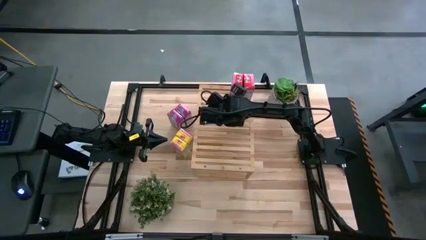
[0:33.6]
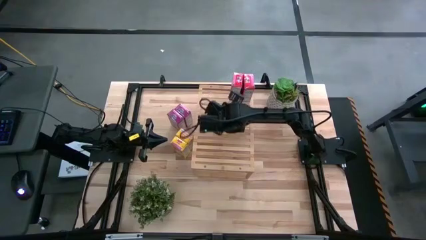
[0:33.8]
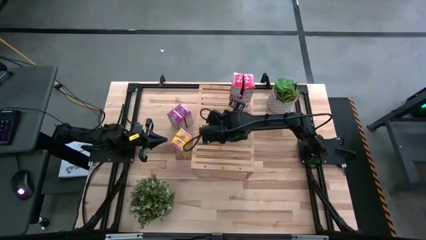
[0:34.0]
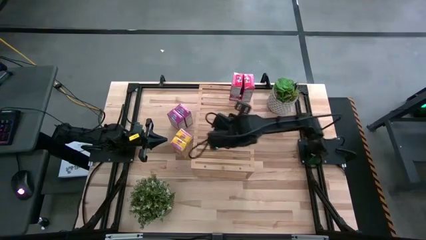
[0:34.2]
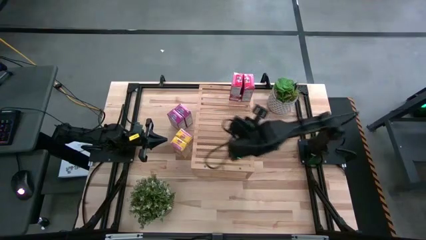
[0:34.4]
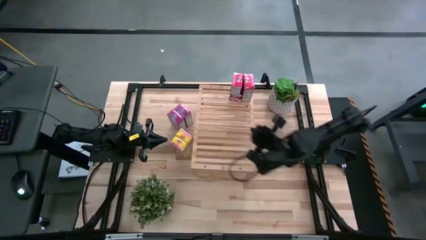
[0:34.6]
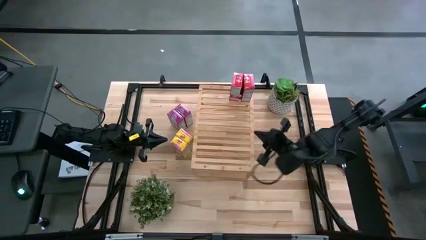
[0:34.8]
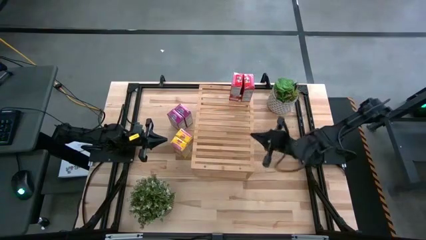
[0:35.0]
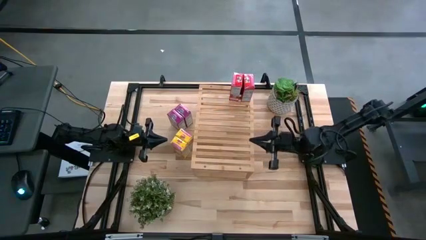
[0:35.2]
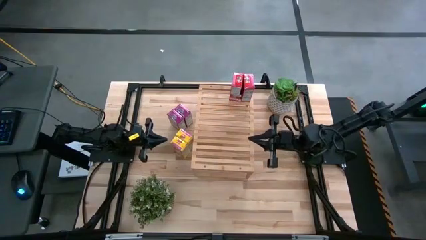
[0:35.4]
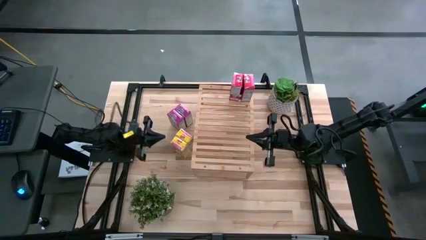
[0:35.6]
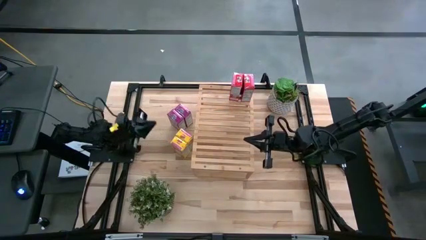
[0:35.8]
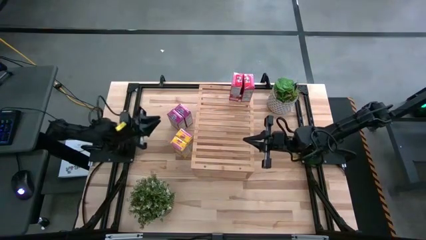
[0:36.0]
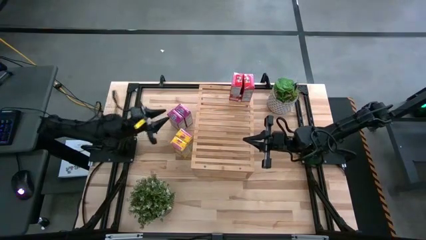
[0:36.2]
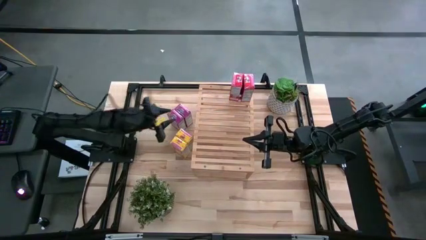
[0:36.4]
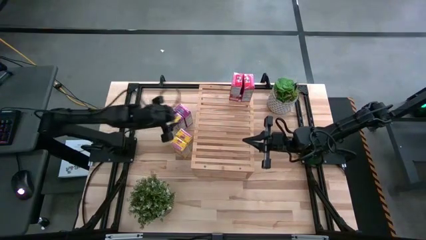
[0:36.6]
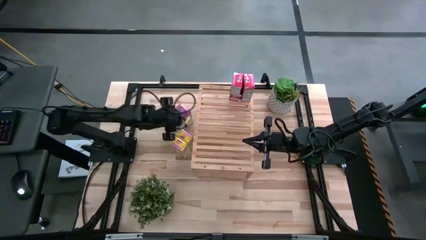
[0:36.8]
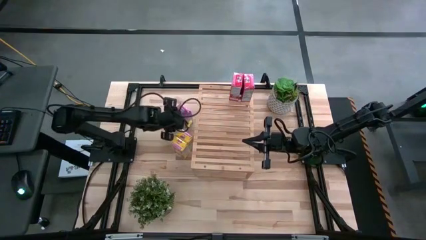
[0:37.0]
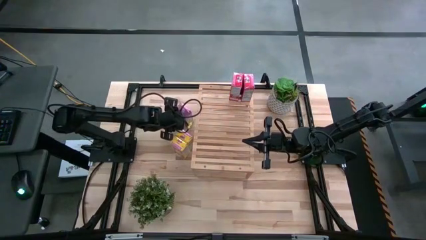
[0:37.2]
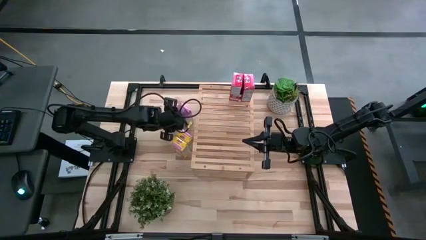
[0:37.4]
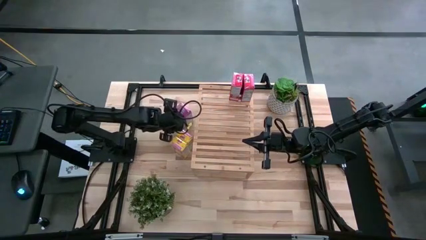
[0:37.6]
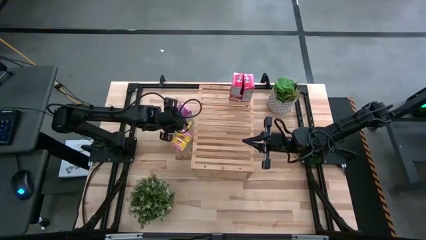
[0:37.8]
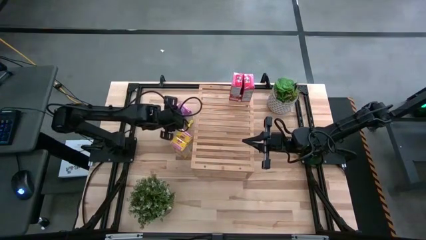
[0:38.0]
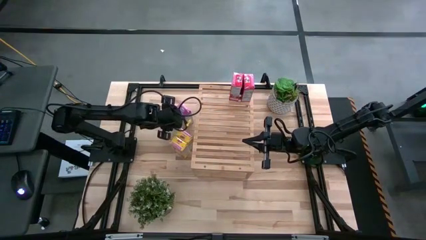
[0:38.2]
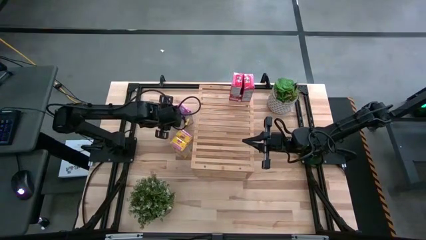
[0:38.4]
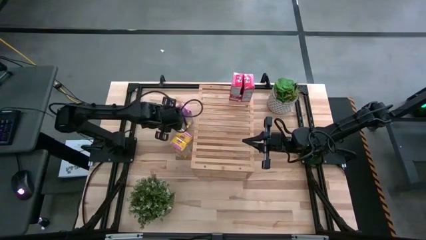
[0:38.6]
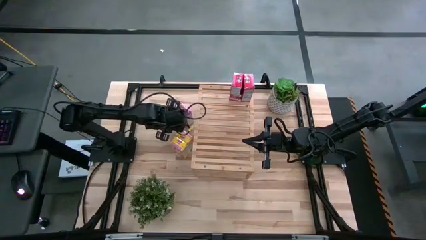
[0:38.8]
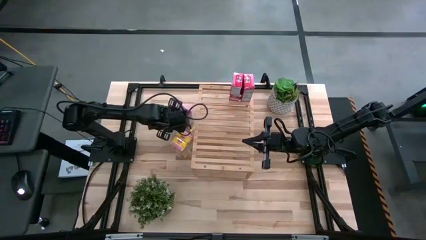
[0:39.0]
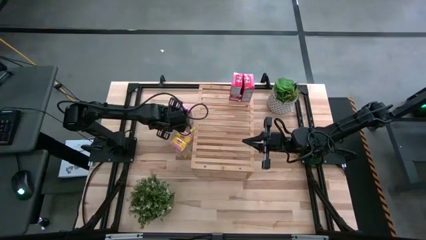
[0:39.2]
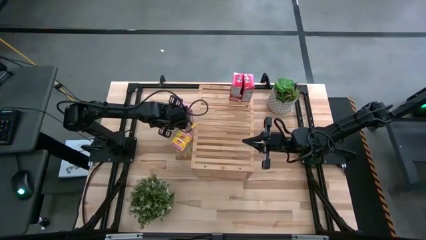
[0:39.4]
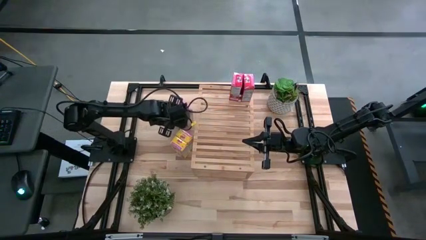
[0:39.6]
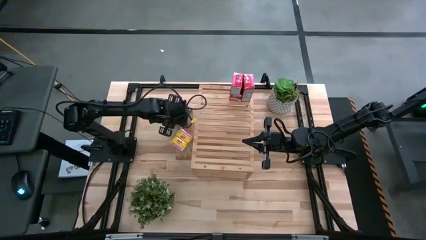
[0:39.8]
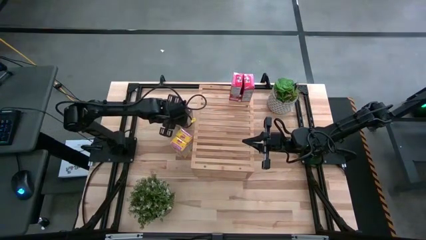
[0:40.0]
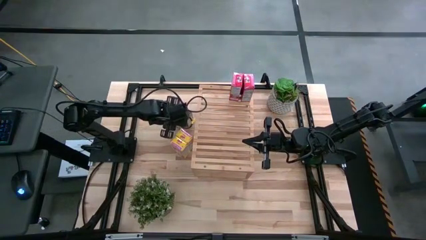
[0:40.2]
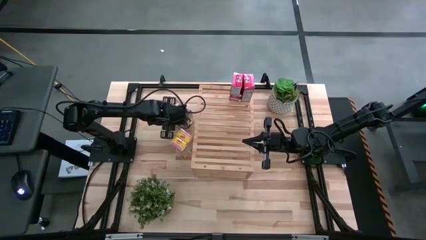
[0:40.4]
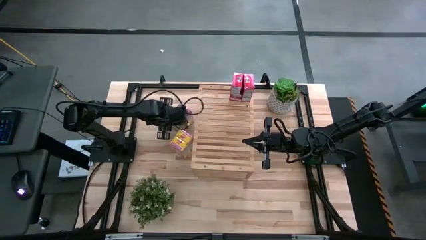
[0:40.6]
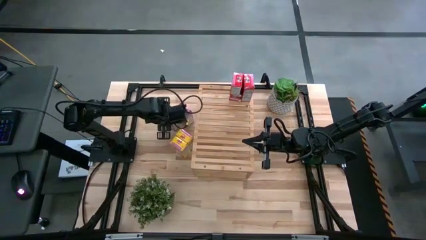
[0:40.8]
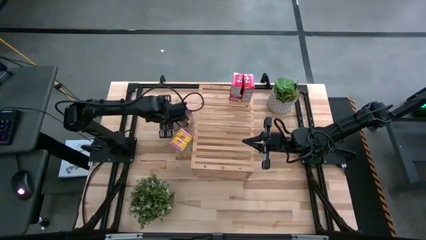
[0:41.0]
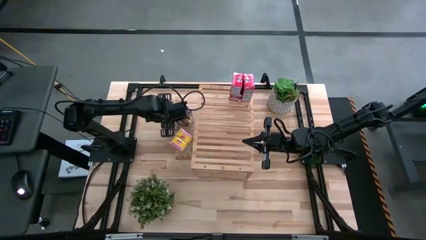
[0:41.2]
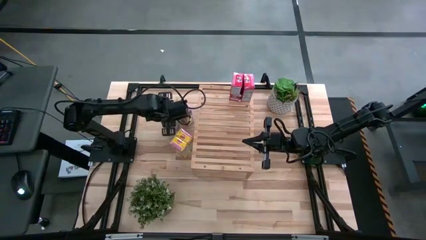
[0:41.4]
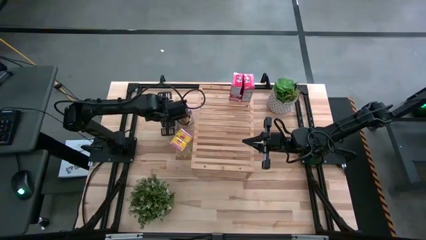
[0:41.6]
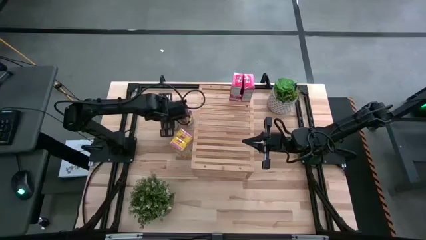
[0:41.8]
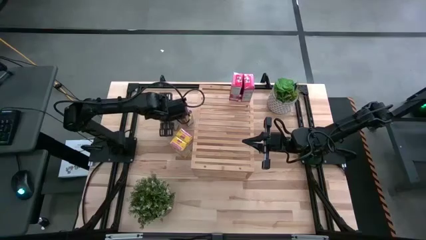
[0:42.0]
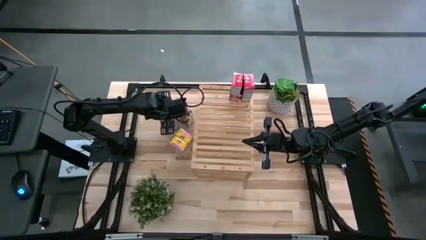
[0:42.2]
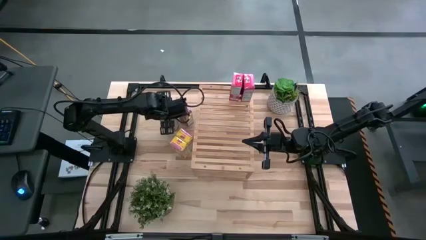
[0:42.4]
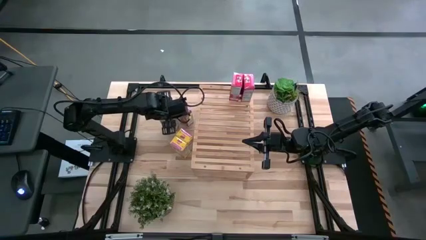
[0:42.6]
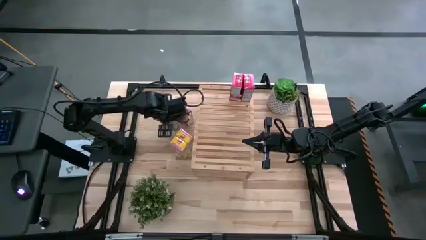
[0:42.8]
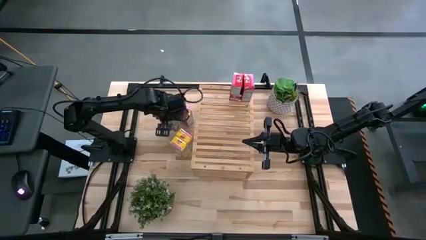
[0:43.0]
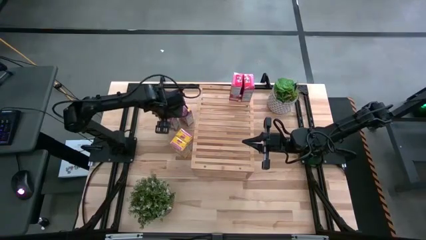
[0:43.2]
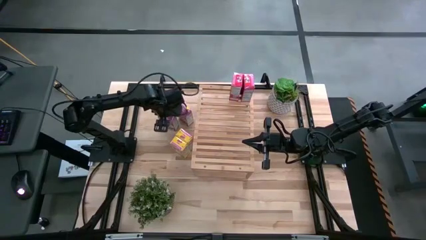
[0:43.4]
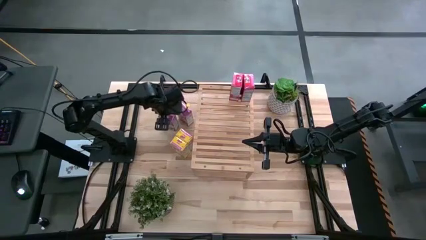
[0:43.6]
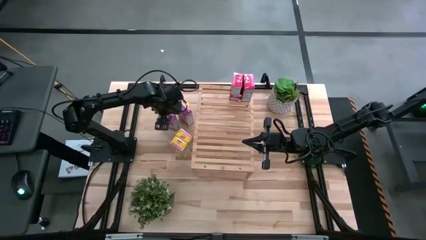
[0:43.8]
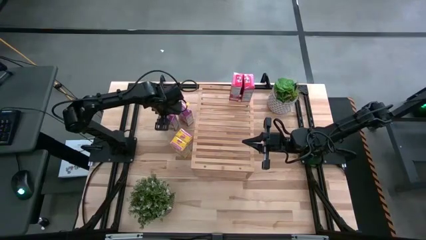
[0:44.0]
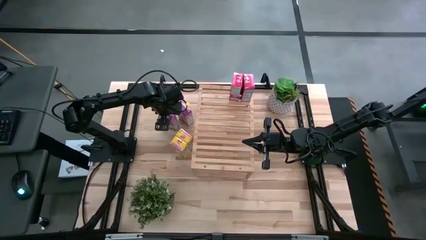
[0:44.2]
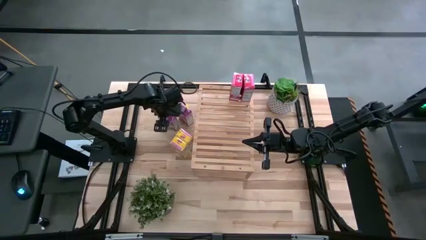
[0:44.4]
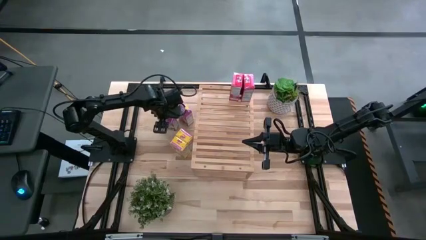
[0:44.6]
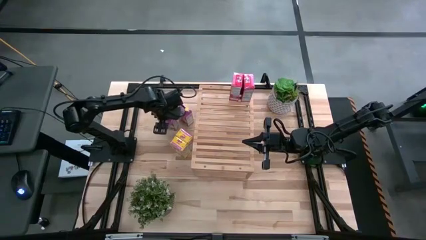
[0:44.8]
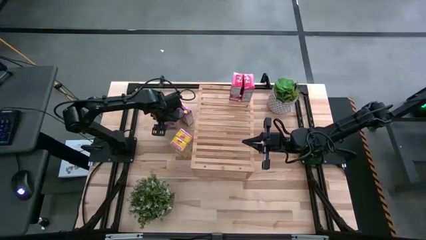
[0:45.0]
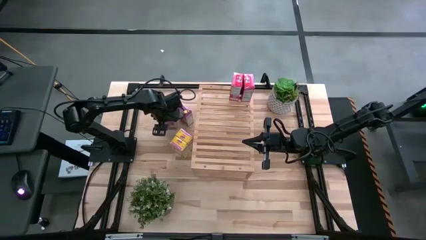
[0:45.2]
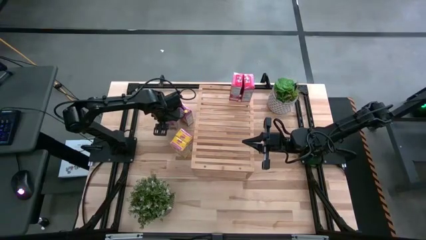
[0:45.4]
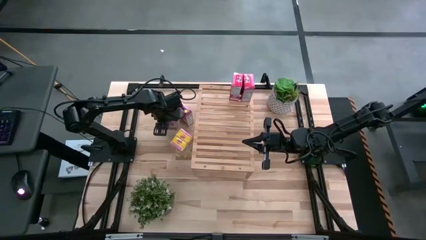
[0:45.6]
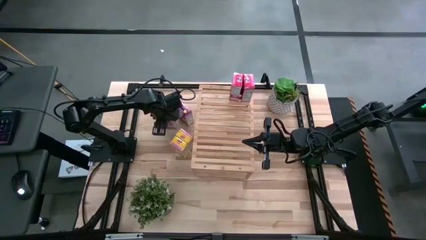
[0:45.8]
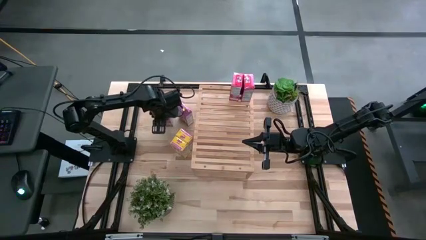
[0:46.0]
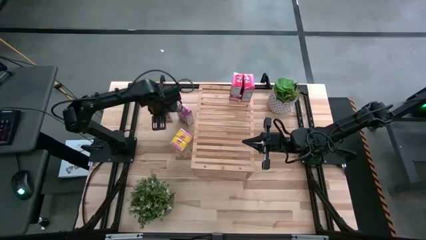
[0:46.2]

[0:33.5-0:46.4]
Task: Stack cereal on shelf
Put the bottom purple cereal box on the shelf

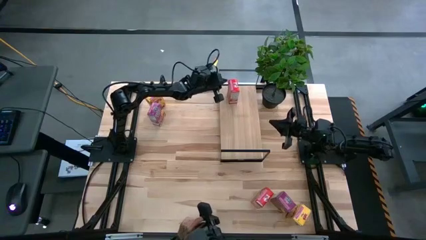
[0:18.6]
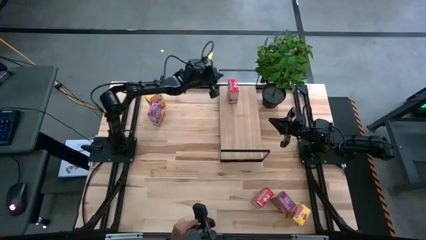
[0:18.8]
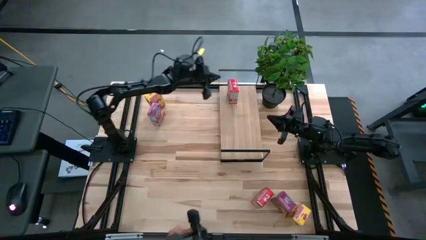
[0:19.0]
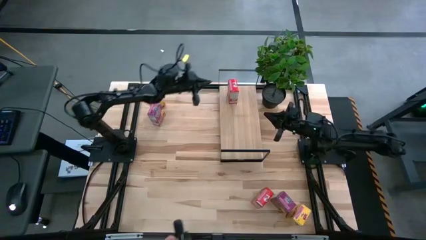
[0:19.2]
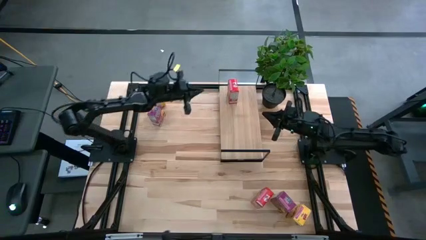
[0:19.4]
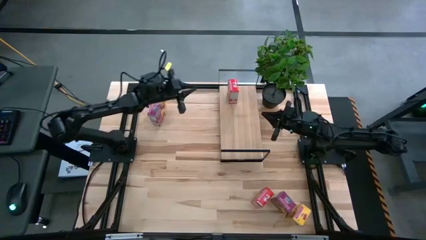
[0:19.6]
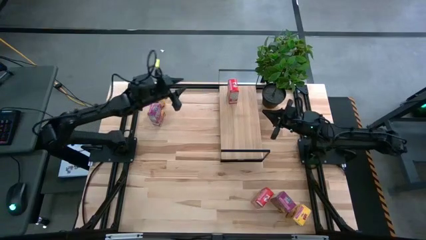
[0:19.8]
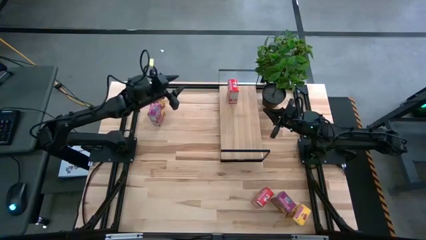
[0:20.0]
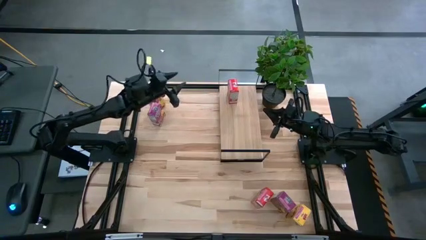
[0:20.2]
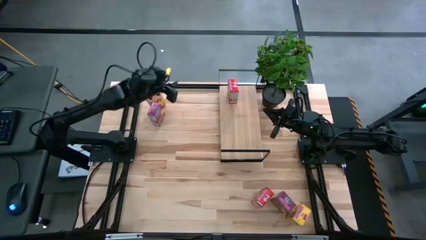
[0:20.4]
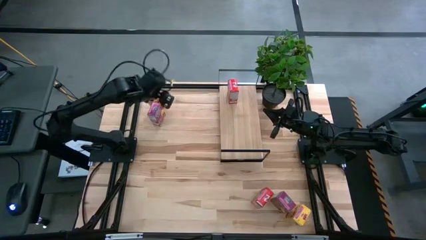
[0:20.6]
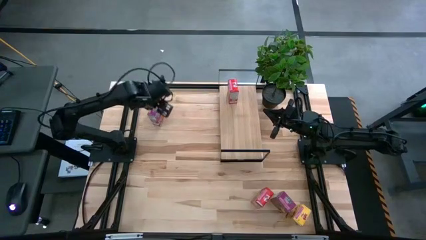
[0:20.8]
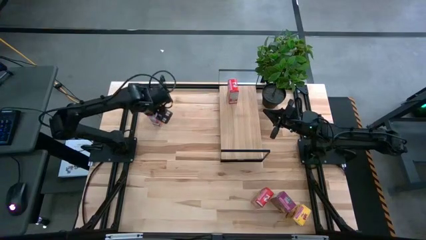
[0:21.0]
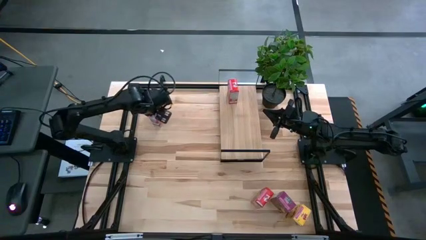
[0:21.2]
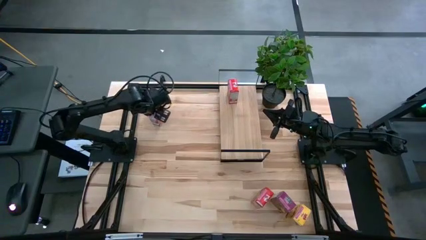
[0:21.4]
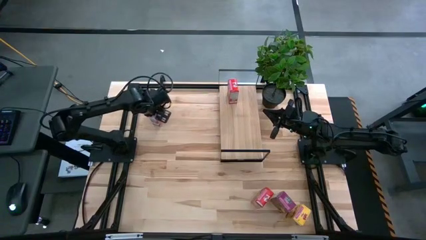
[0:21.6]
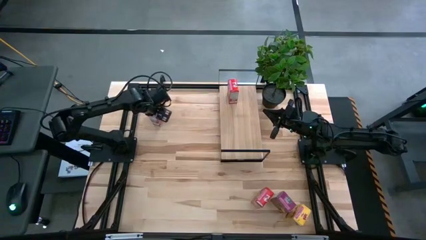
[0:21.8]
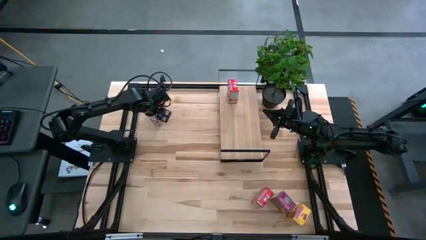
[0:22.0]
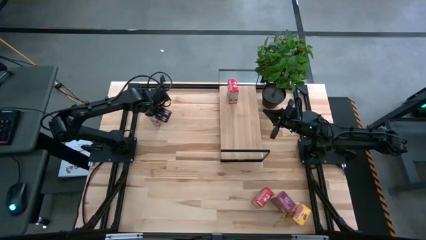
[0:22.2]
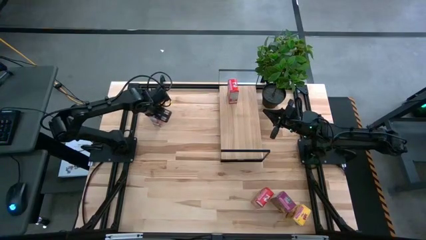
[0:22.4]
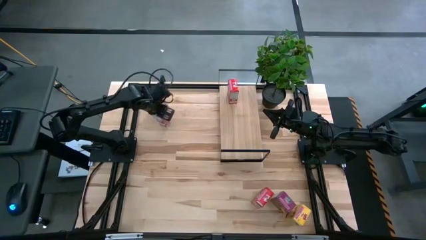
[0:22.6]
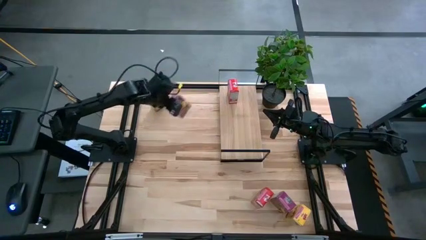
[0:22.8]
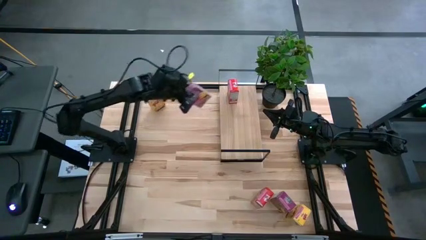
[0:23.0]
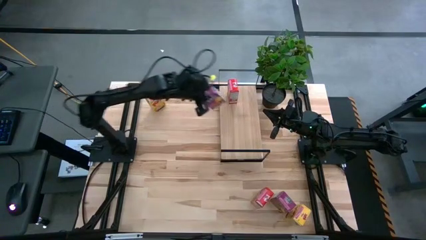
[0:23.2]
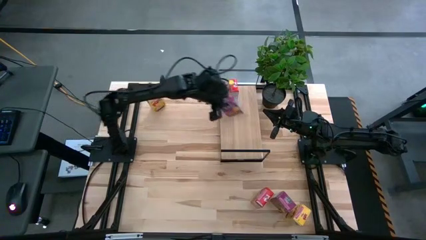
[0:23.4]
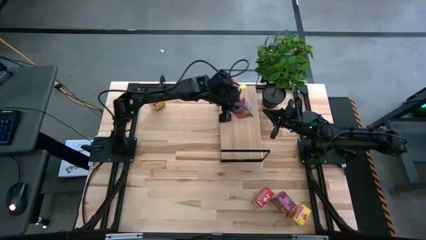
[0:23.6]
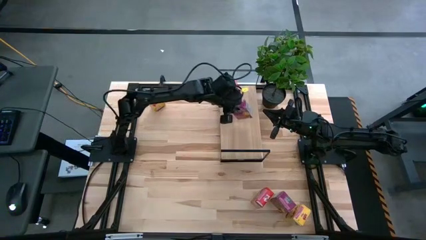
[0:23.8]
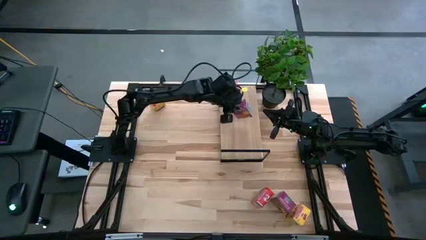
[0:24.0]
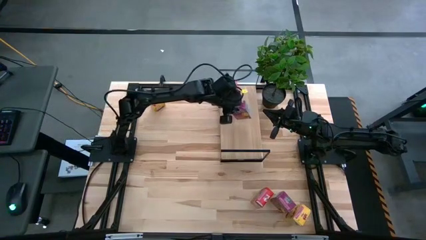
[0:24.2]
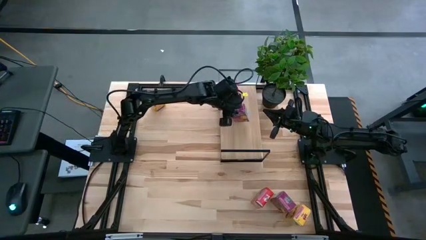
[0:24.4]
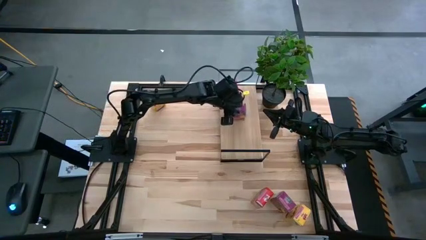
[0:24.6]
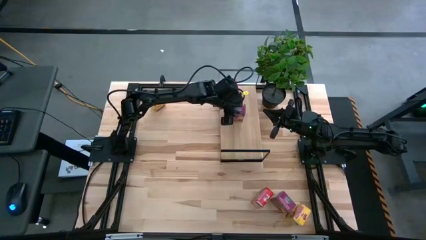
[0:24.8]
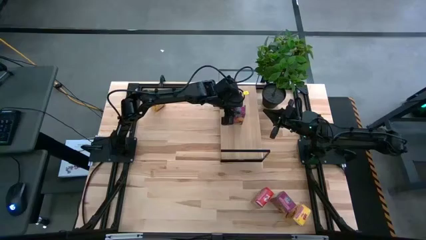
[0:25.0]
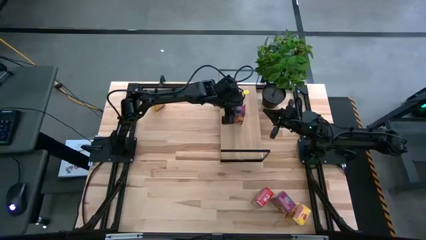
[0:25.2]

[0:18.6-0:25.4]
Task: Stack cereal on shelf
Put the top purple cereal box on the shelf
